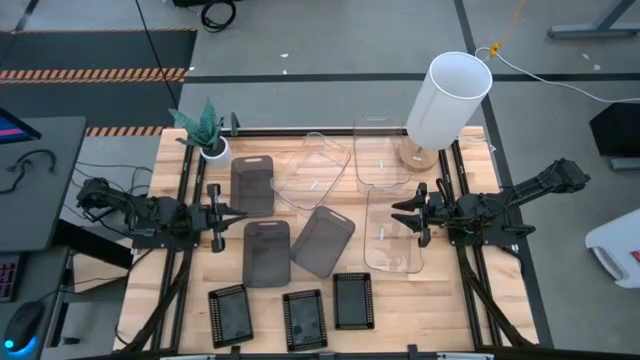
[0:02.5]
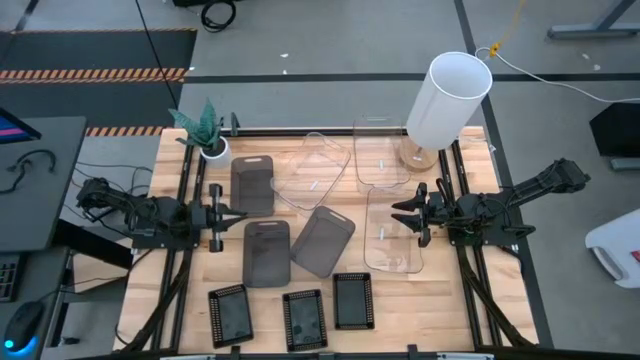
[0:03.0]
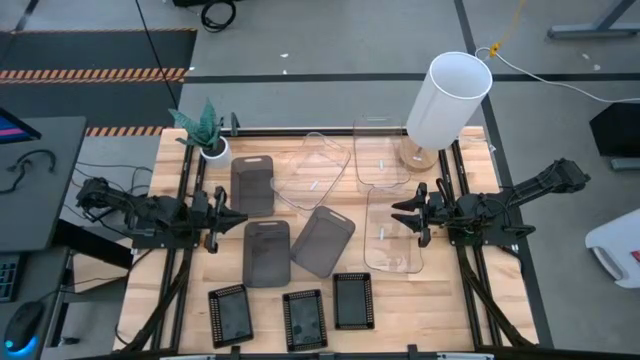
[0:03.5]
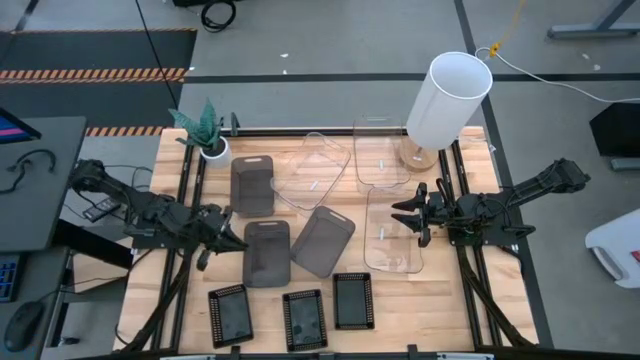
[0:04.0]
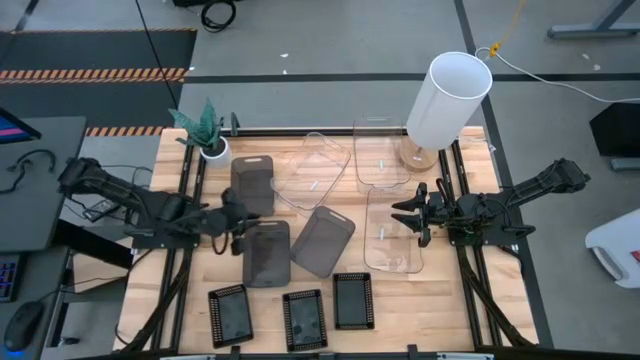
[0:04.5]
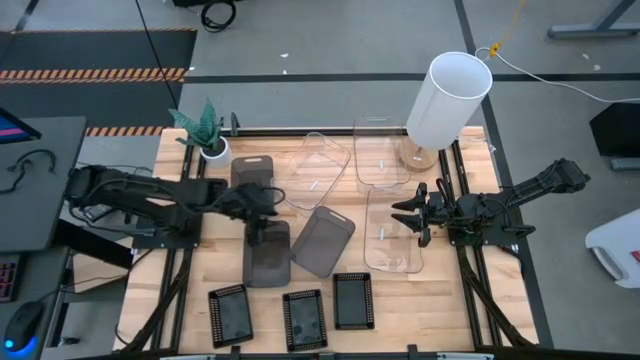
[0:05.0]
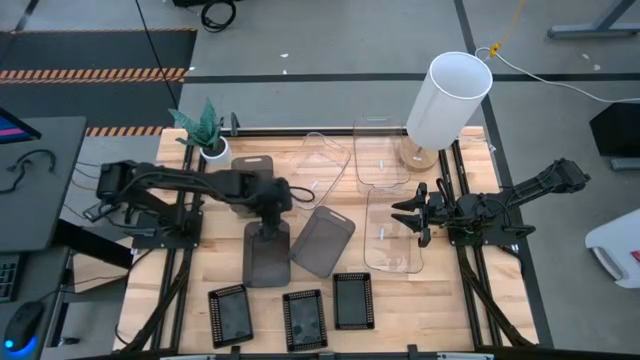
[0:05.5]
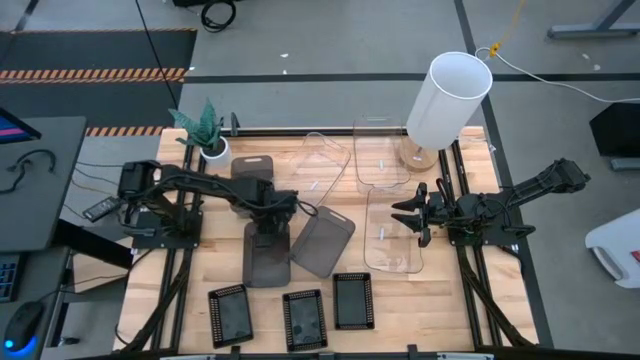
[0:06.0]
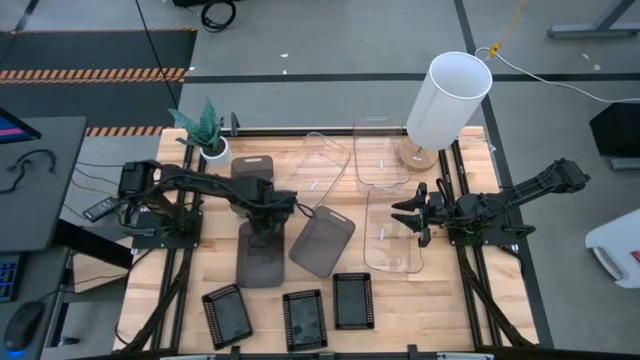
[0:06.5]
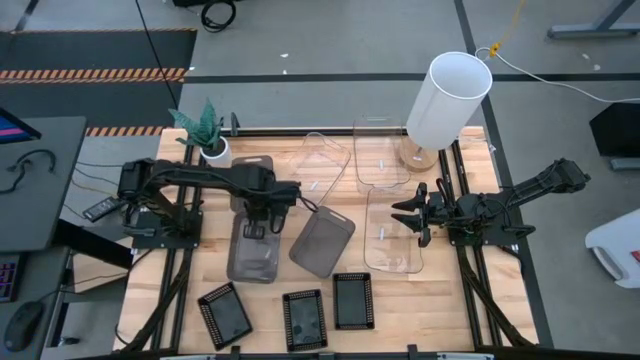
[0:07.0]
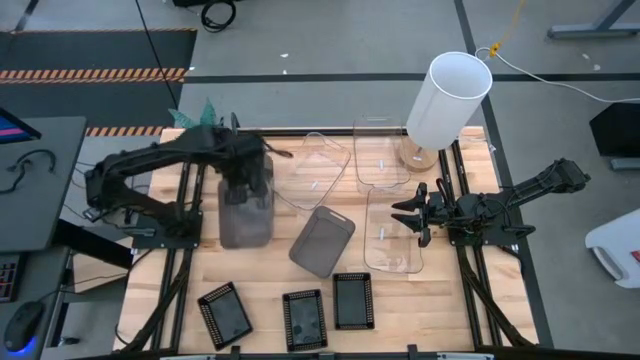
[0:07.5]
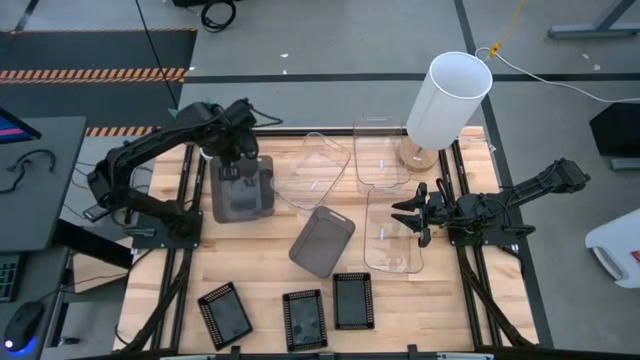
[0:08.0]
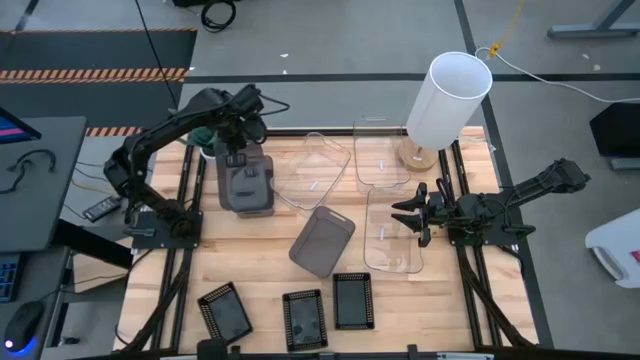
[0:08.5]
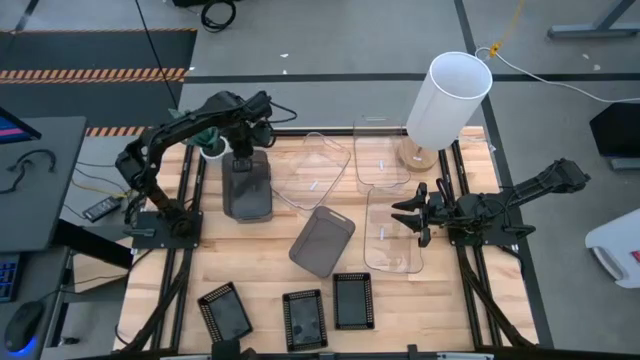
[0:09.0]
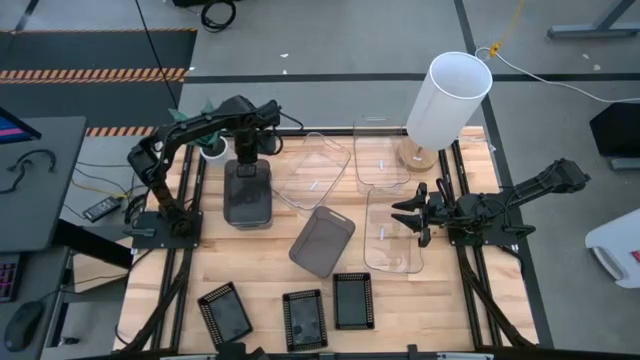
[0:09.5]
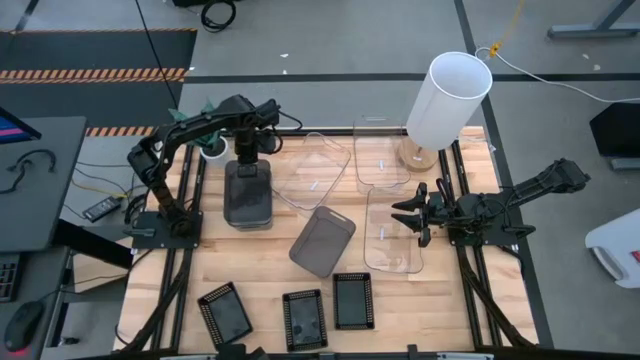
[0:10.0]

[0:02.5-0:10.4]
Stack the bottom left gray bin on top of the top gray bin

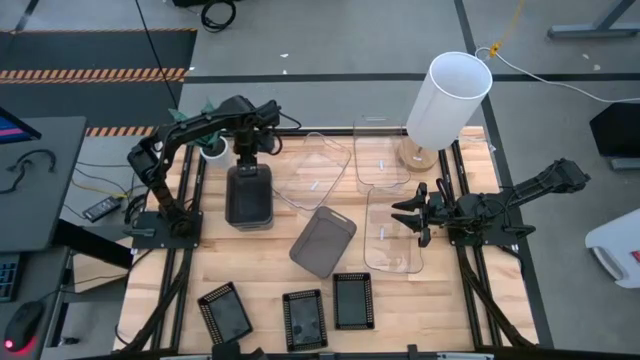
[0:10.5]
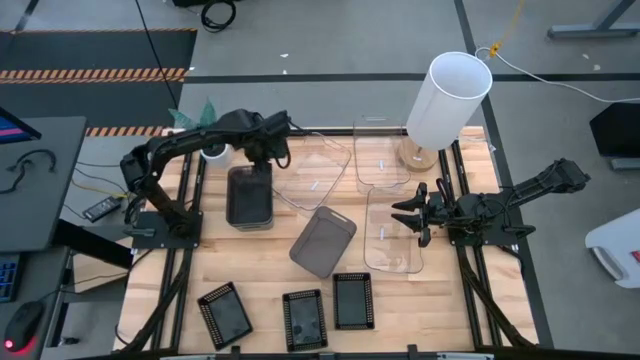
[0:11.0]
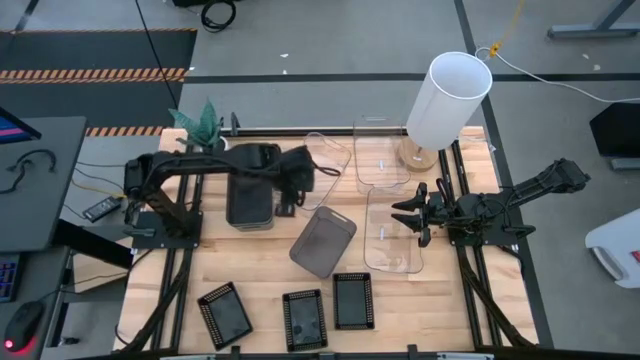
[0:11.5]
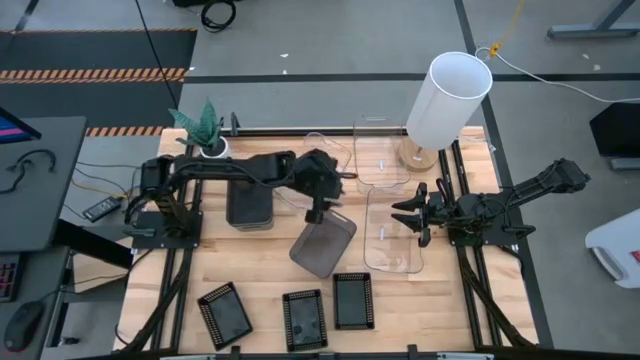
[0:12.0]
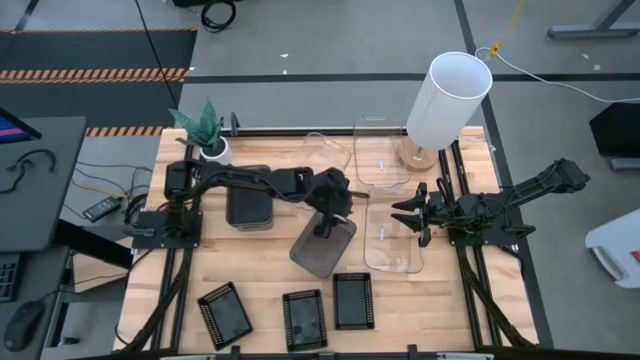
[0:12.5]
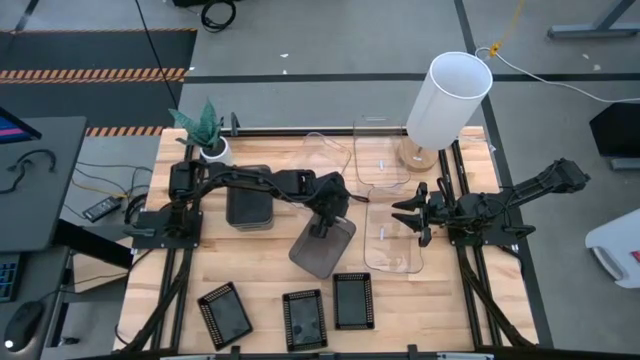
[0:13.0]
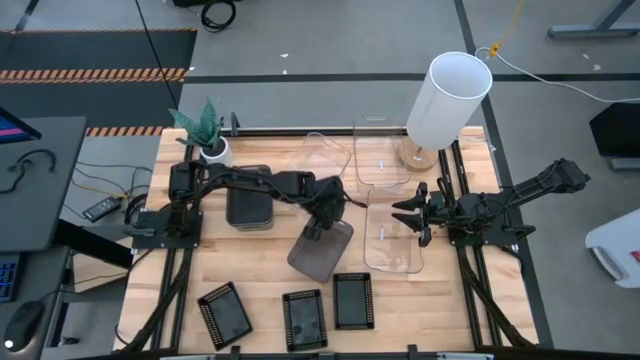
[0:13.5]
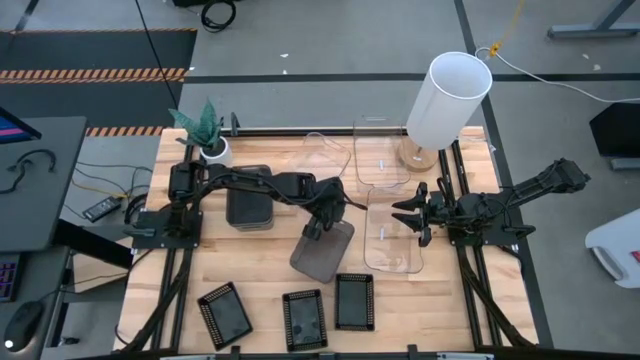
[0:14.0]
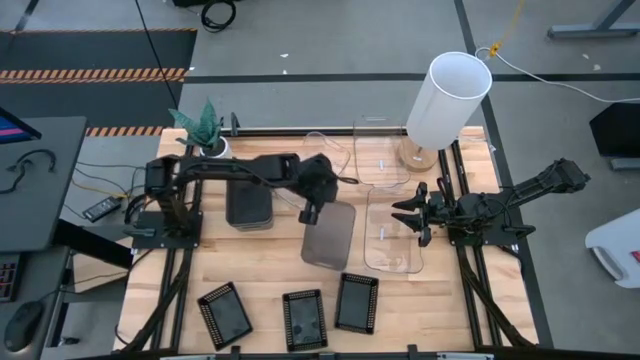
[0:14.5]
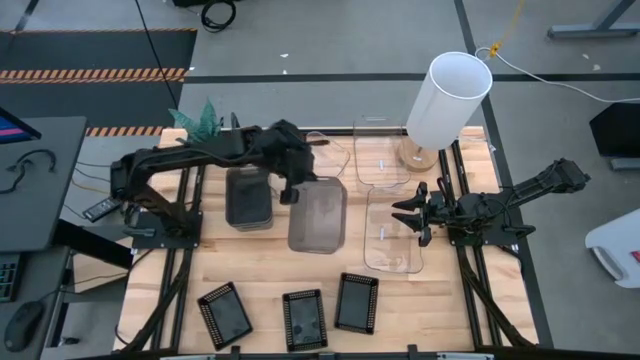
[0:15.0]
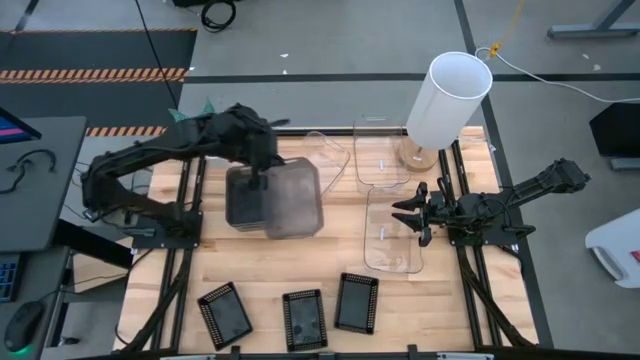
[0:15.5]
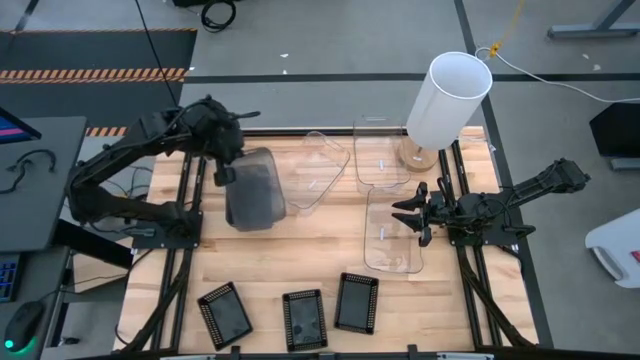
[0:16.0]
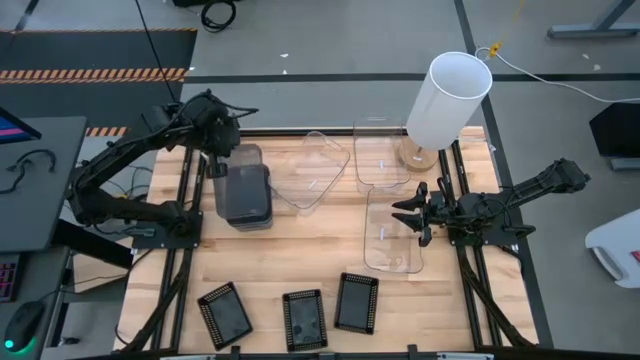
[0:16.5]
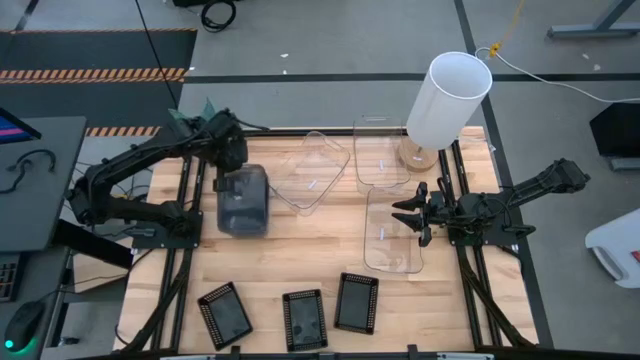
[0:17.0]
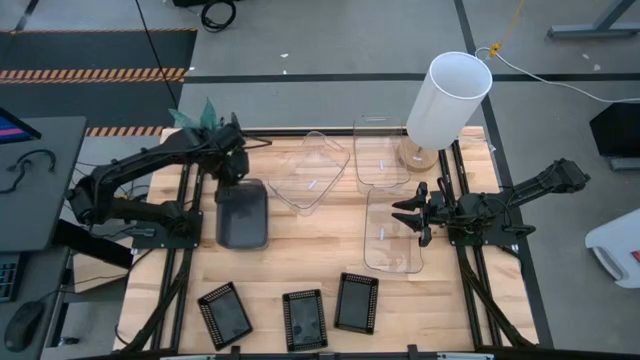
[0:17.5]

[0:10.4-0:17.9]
Stack the bottom gray bin on top of the top gray bin
